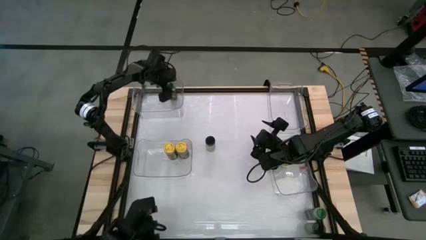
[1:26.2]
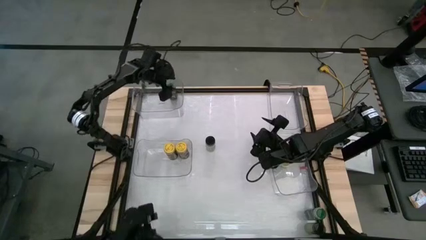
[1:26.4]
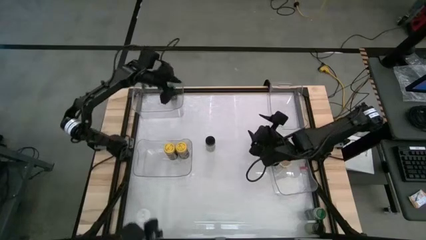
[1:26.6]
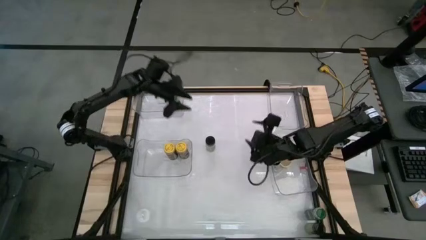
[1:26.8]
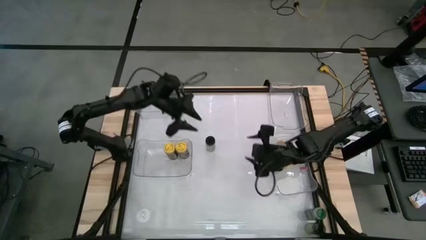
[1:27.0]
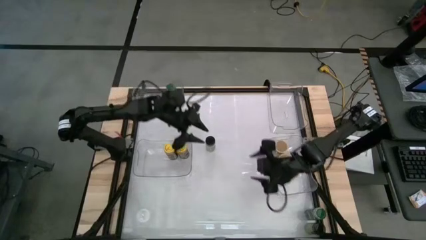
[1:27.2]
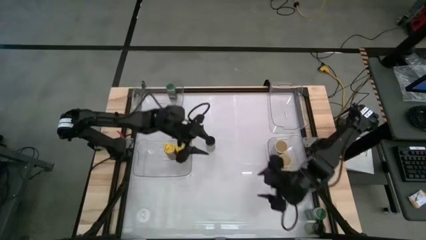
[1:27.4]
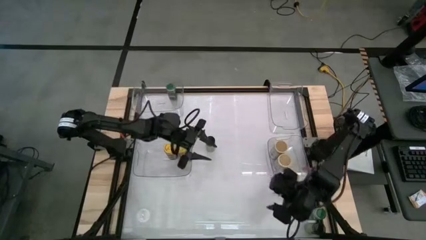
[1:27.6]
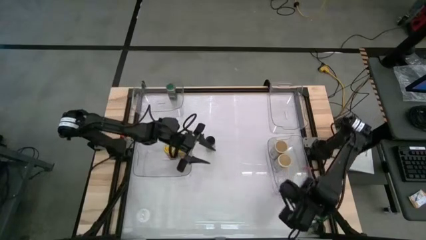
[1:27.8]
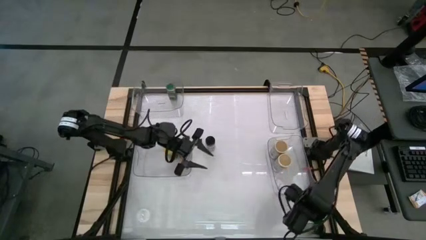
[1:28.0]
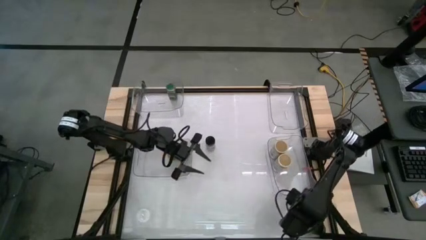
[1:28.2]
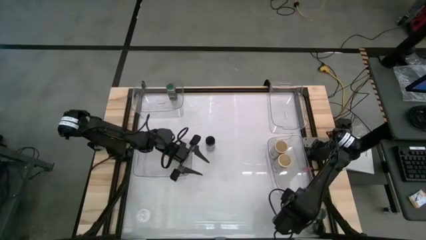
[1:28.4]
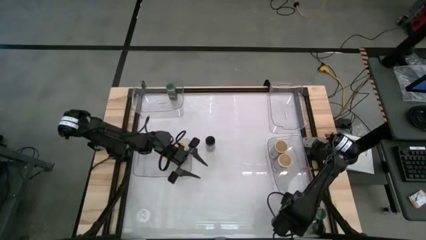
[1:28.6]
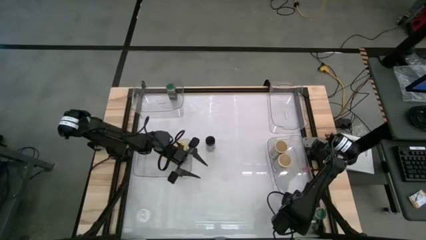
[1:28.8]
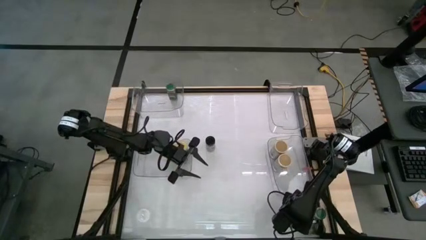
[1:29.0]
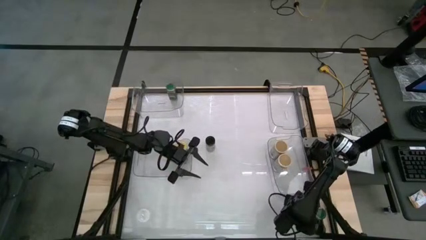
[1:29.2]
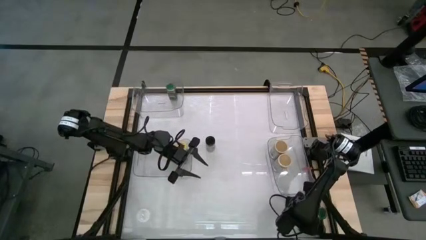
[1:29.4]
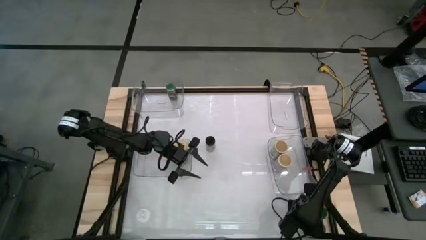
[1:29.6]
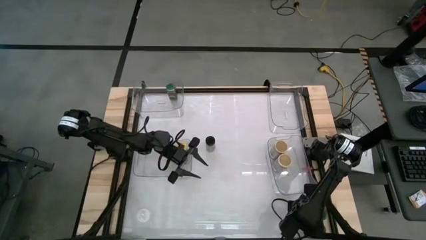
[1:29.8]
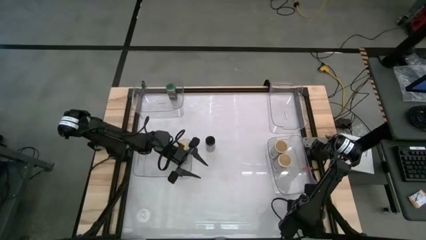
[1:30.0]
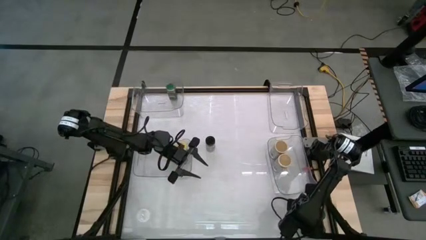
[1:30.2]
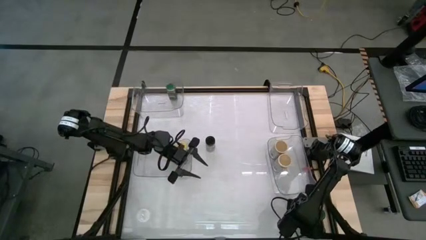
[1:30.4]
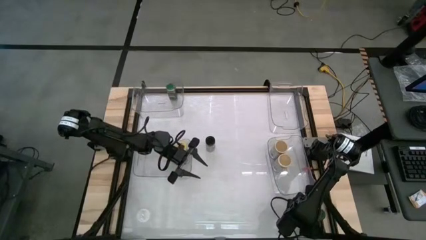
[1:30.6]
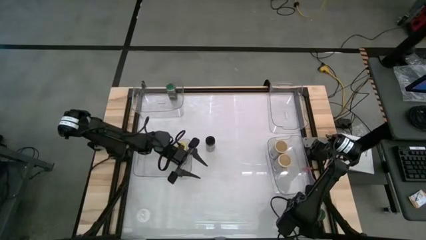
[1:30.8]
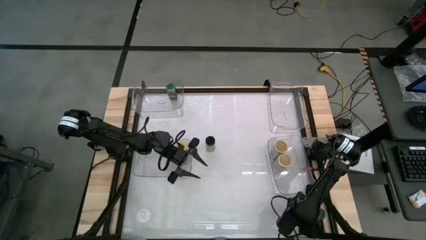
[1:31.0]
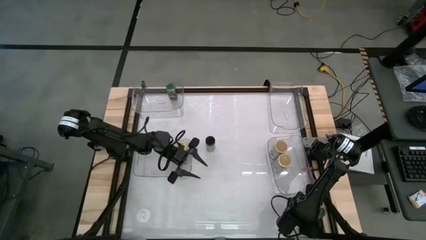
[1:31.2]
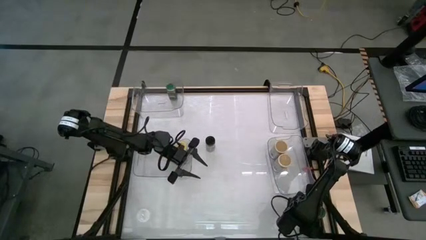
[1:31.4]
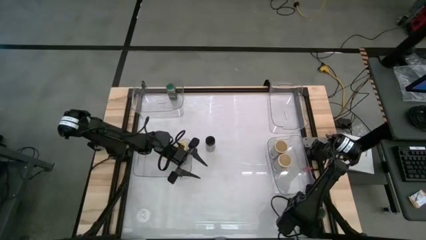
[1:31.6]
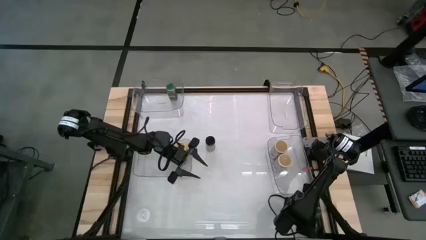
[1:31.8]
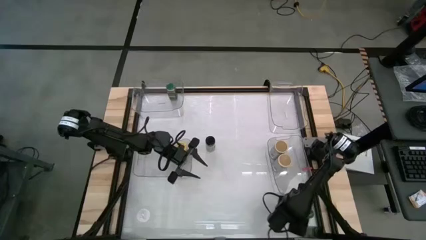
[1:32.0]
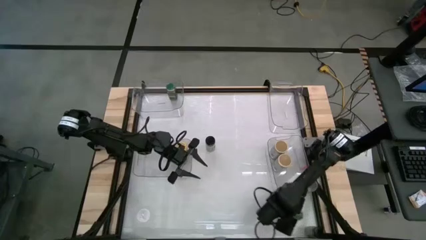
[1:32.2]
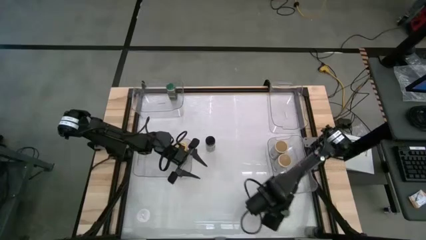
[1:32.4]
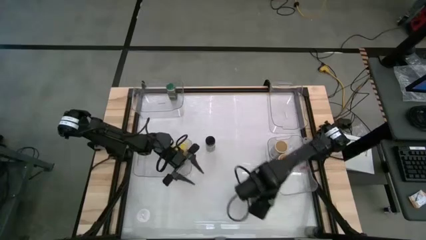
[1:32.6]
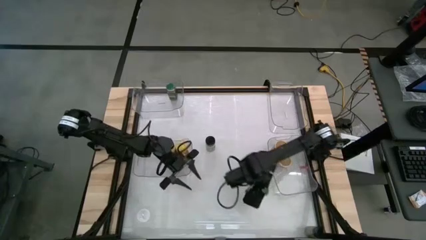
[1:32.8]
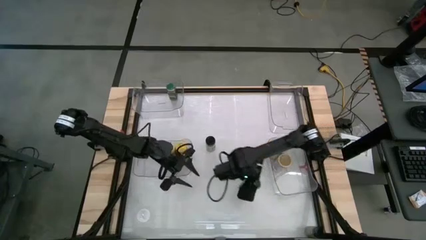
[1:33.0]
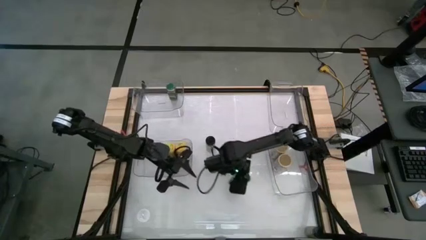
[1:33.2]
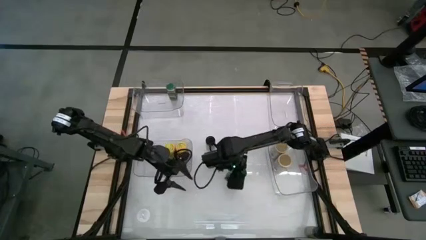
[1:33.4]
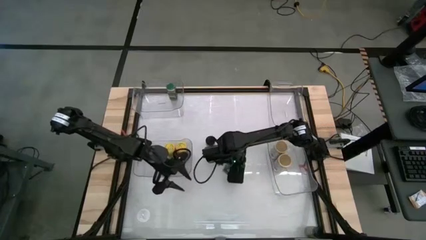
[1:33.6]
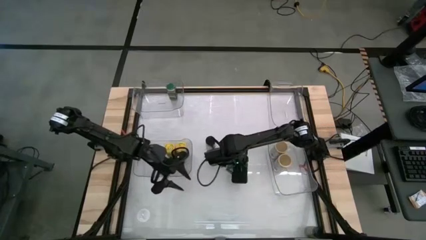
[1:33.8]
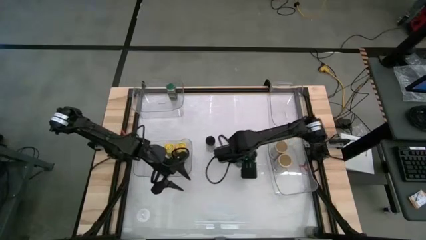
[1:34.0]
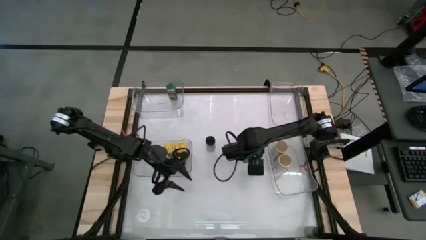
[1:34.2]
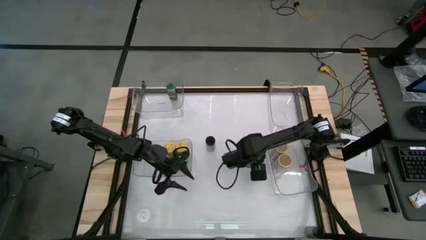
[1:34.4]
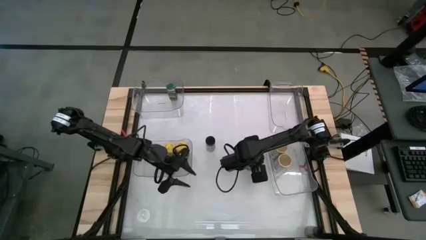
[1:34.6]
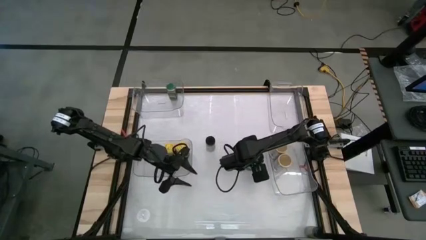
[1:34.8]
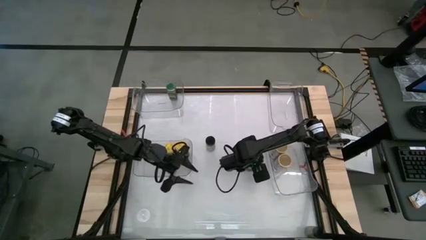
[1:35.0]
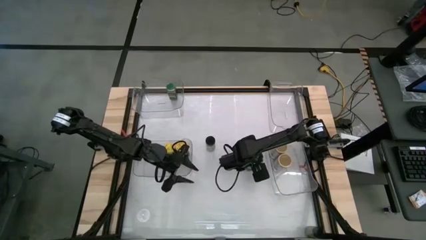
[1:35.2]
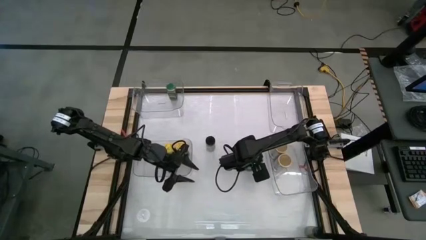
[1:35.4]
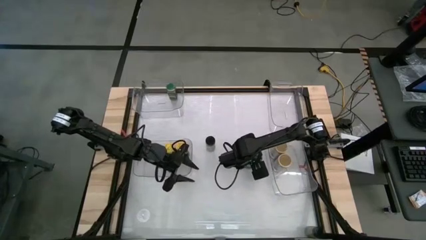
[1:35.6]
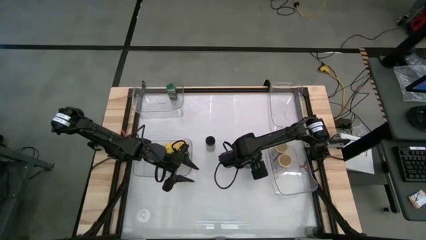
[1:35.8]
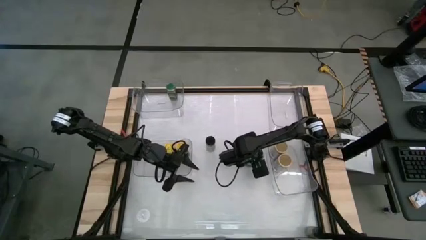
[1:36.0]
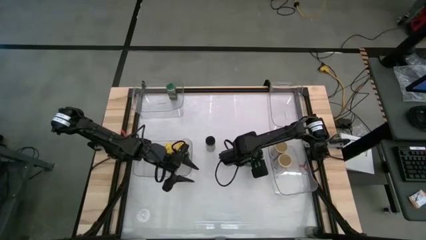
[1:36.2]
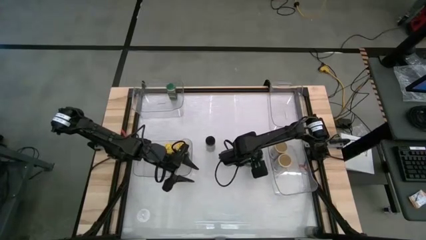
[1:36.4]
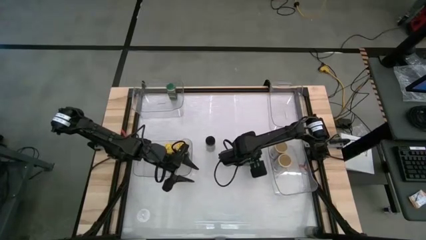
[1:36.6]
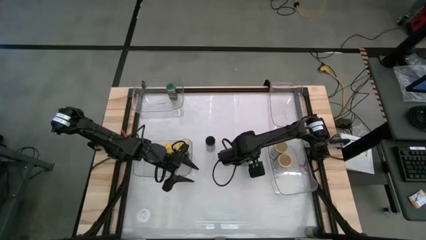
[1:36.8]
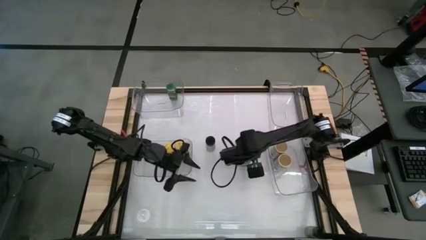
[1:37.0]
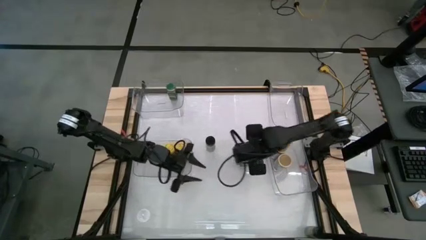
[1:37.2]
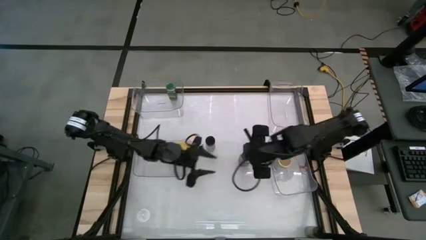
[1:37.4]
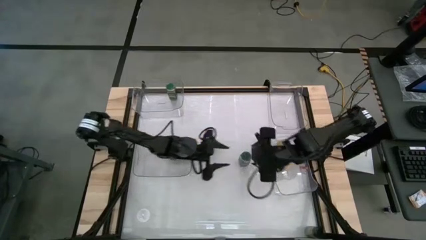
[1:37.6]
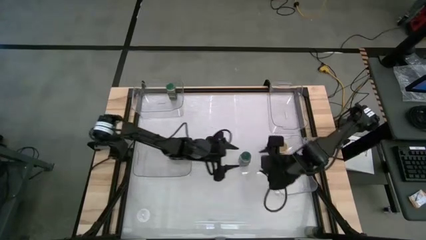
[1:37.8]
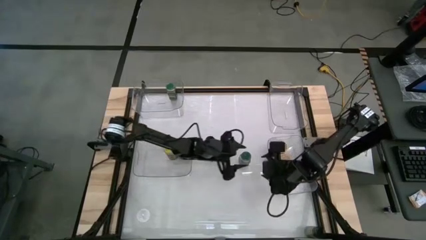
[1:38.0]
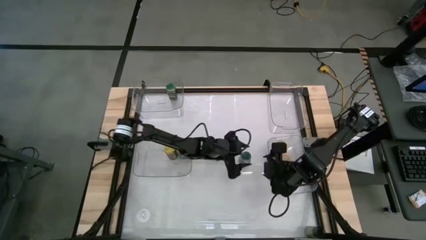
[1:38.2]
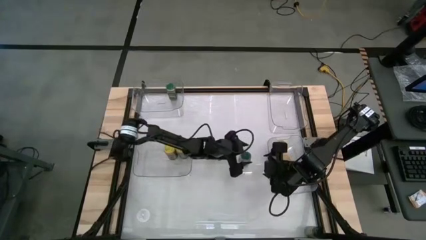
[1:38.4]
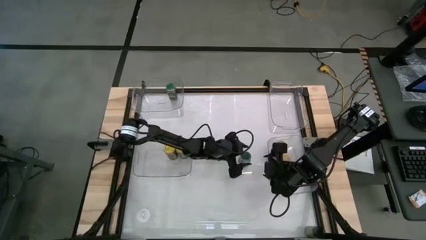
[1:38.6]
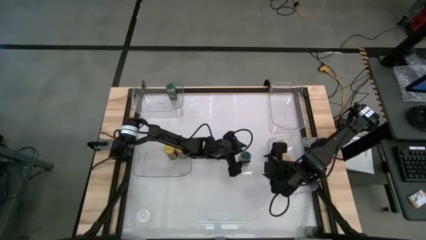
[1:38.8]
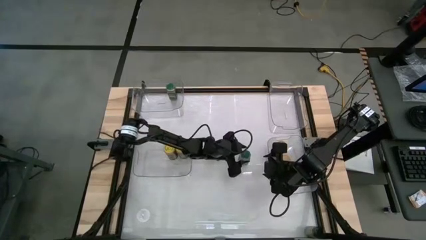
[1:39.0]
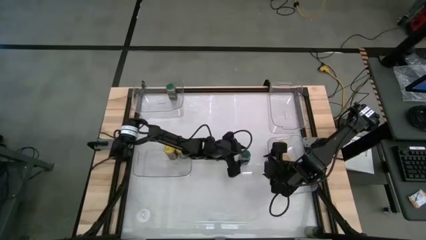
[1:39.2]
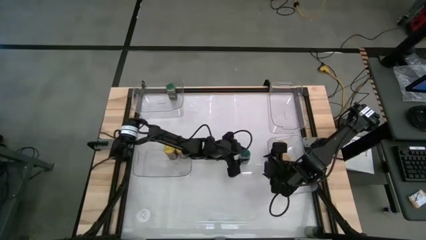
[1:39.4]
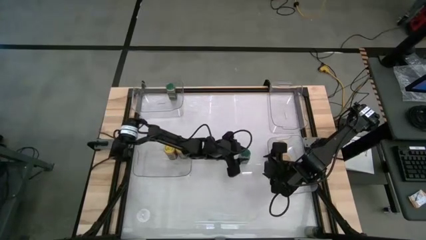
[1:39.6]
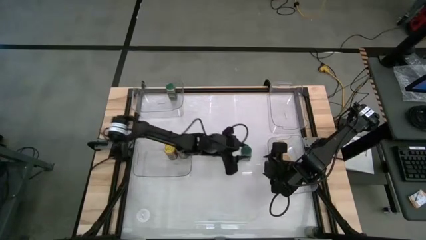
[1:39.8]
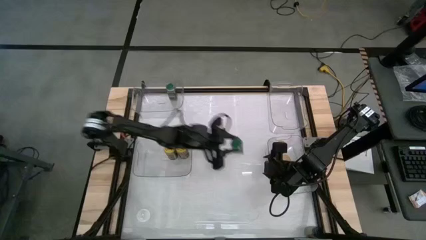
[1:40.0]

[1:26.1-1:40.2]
Task: Sort spices by type
Put the green spice bottle into the top left transparent bin

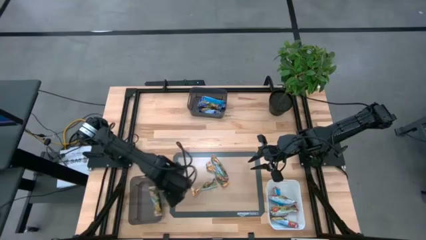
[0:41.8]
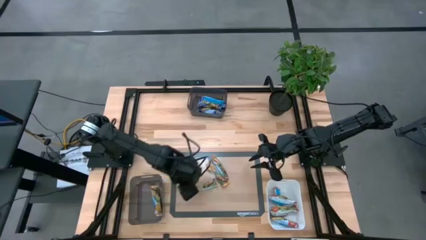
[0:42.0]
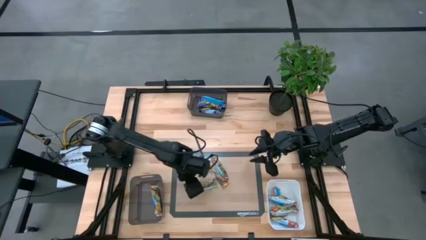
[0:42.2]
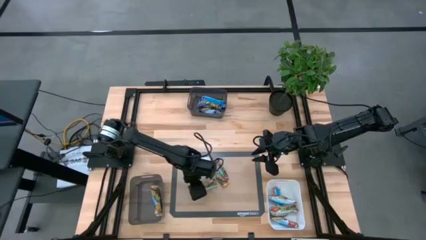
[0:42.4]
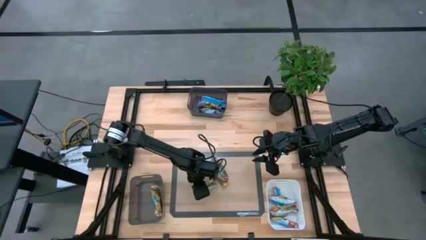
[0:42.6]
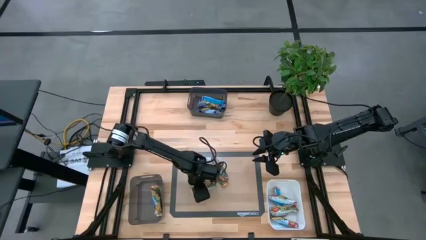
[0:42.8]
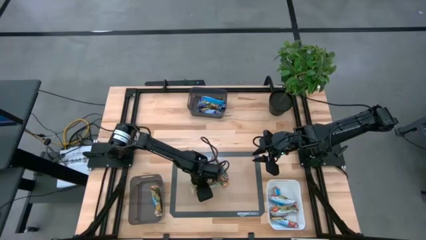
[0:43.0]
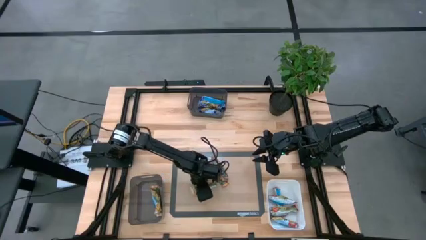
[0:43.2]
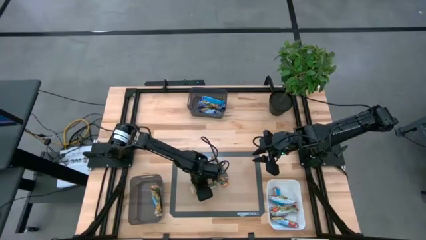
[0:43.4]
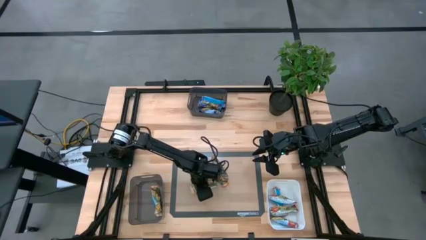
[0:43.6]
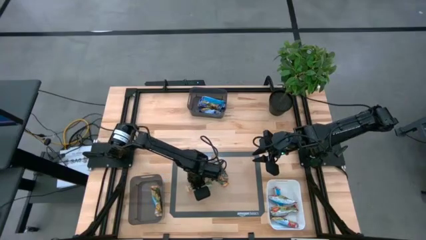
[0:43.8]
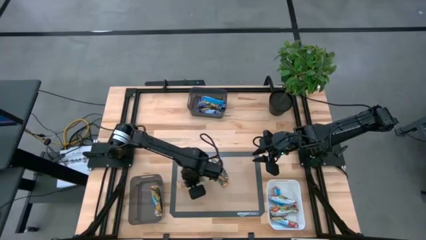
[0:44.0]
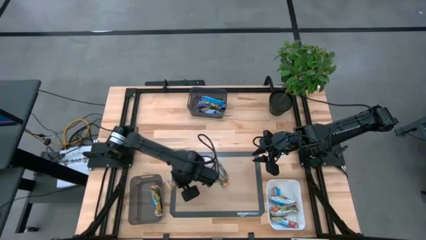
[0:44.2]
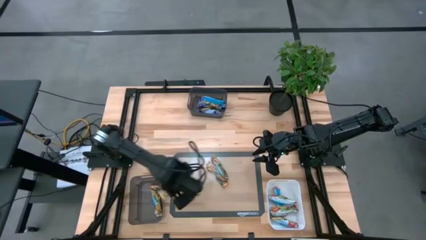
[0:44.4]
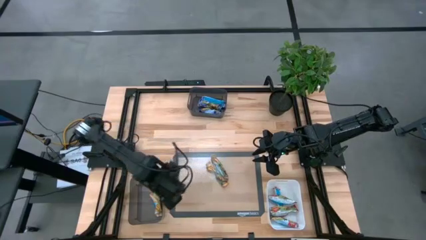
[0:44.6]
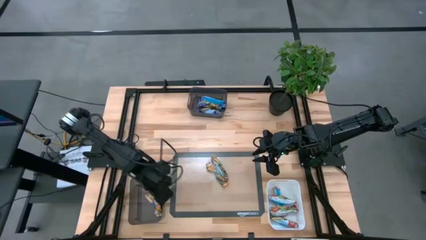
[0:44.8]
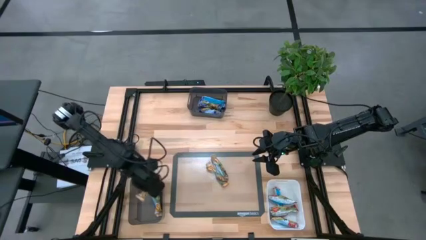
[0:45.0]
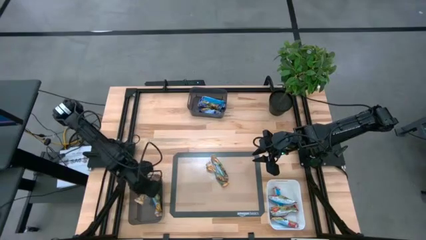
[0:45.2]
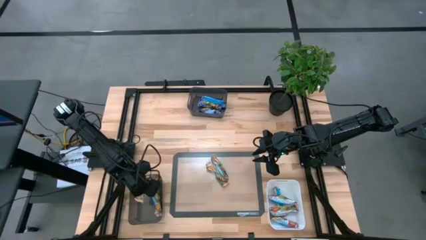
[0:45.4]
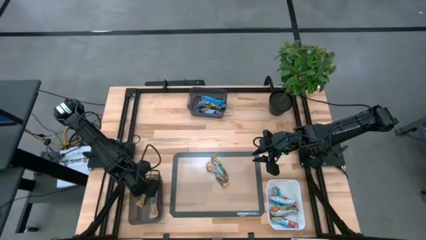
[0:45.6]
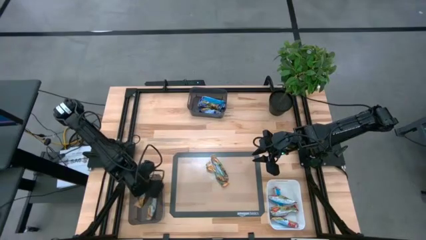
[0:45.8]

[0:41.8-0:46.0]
Task: Pick and place Granola Bars by type
Put the left orange into the bottom black transparent bin
